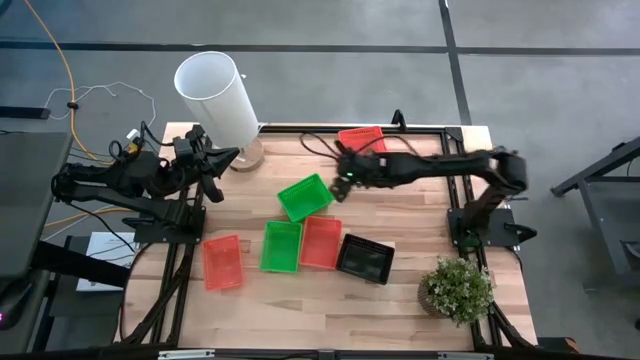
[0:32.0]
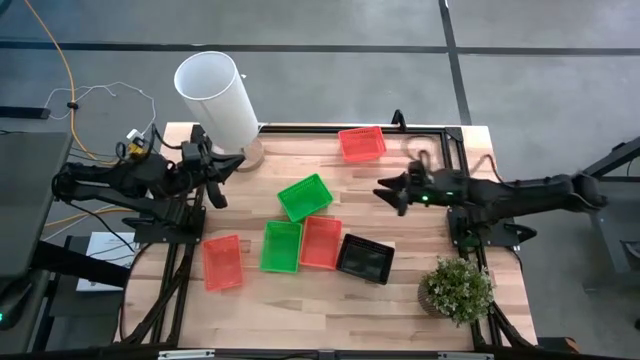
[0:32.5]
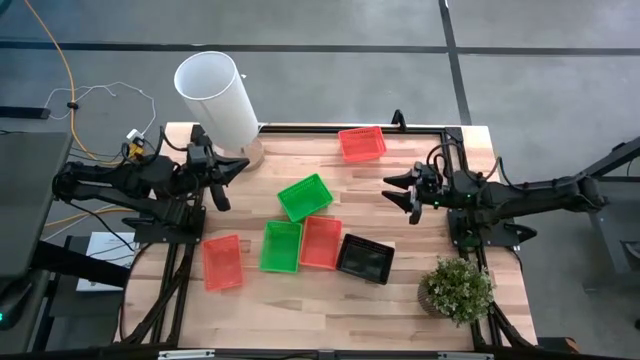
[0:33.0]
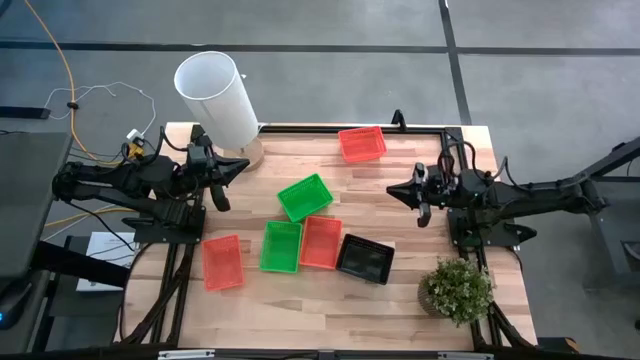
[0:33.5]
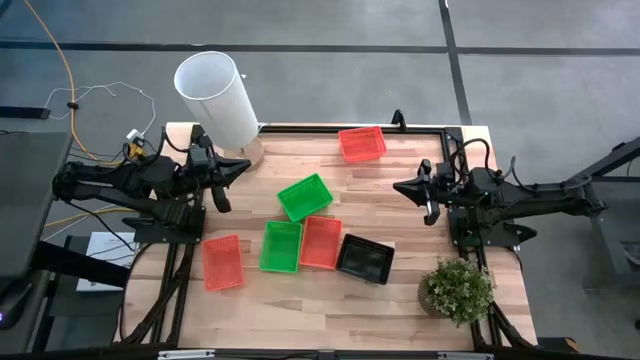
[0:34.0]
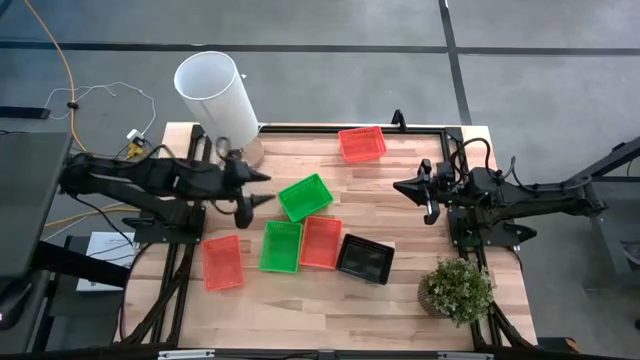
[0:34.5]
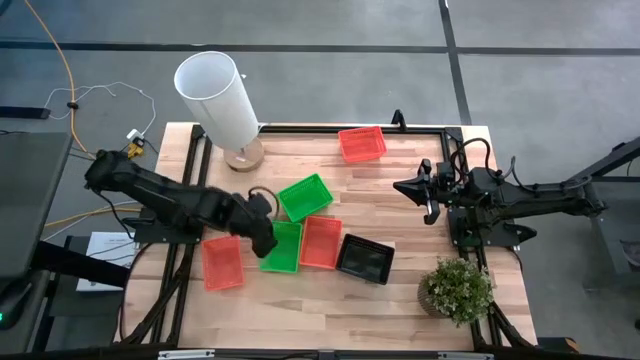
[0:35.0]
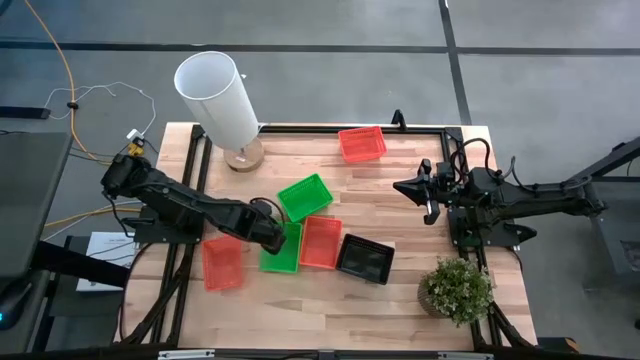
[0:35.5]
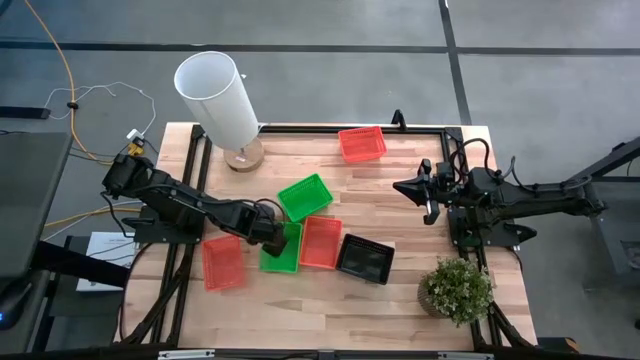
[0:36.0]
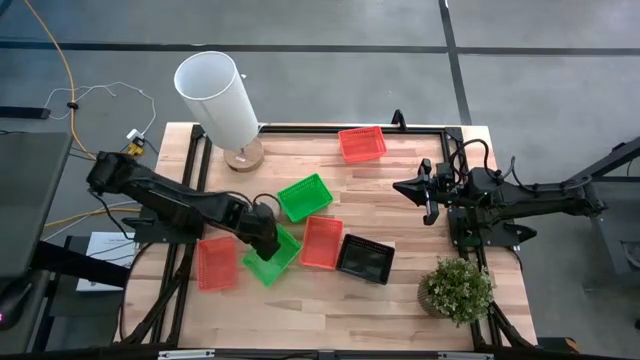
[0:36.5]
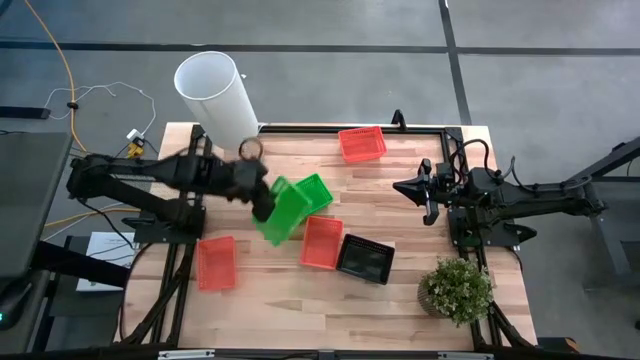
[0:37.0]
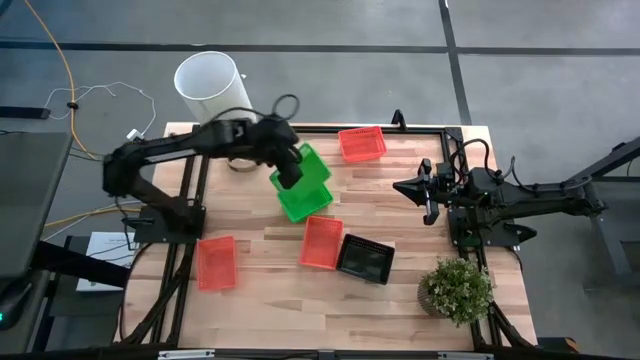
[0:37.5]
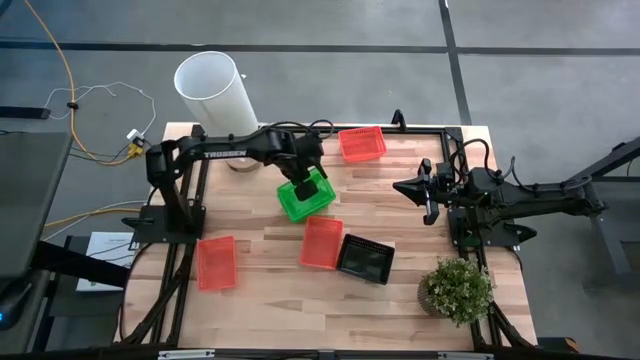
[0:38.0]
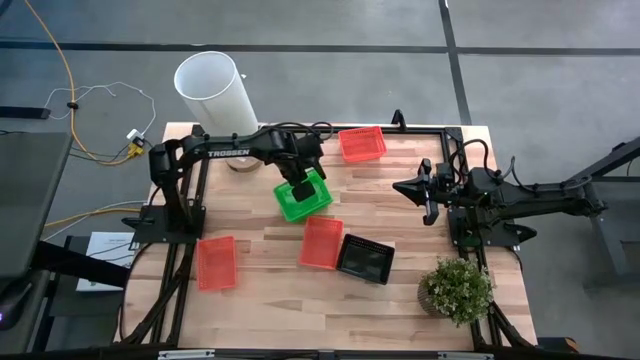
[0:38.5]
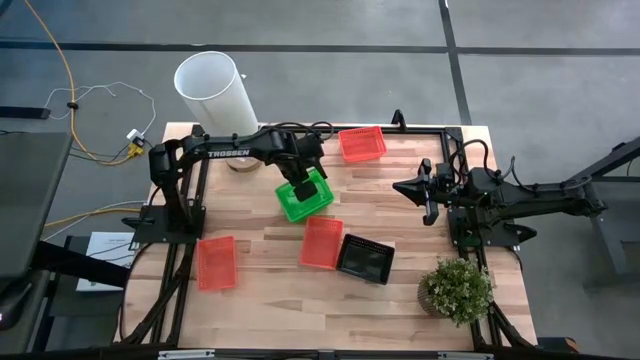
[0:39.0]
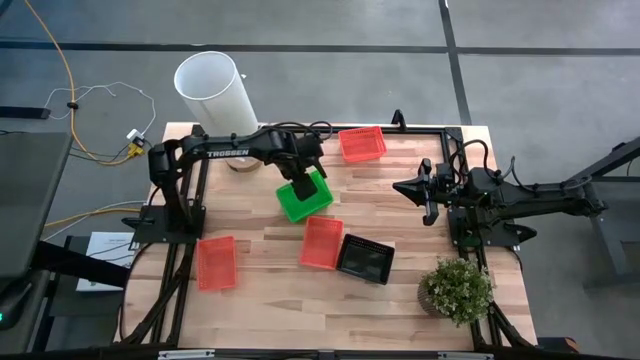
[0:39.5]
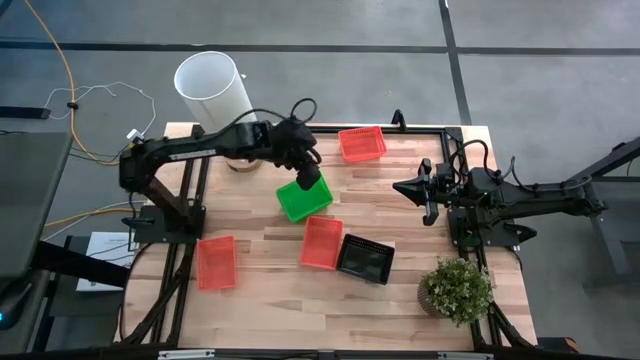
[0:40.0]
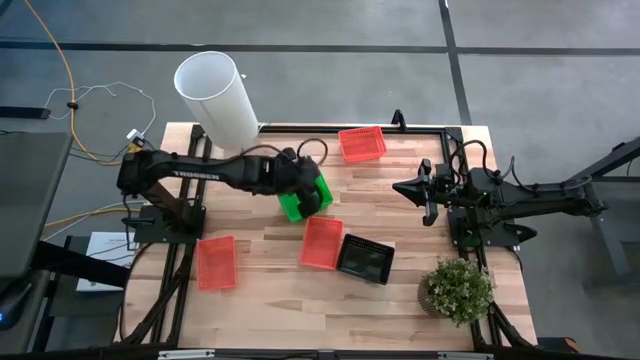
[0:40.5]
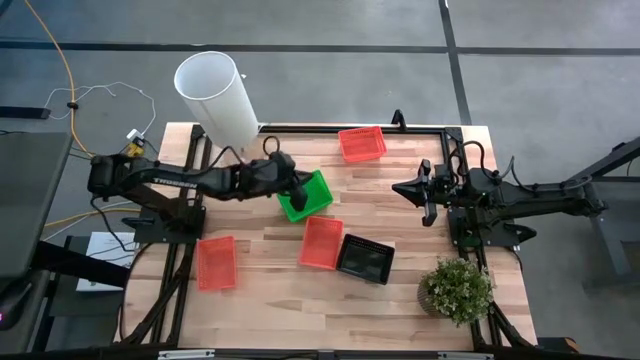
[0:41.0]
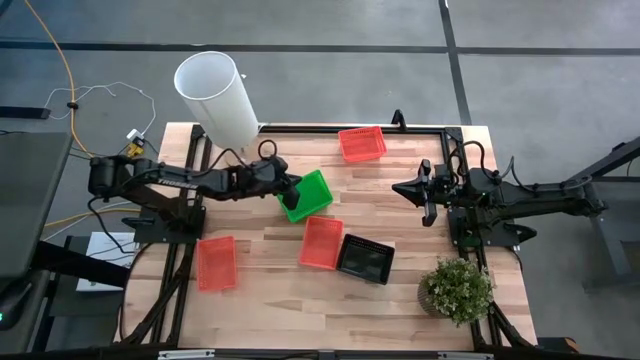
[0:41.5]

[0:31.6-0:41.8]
Stack the green bin on the green bin

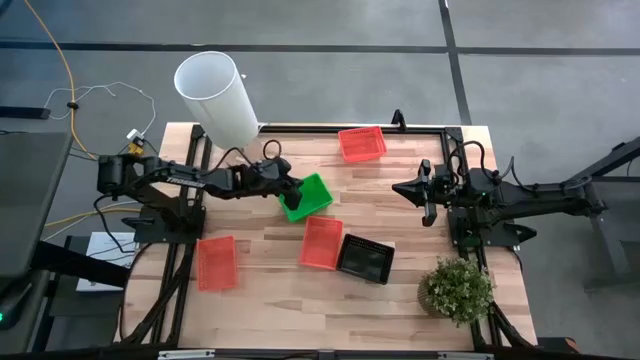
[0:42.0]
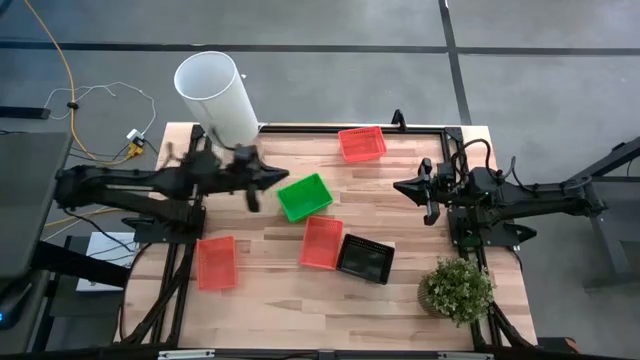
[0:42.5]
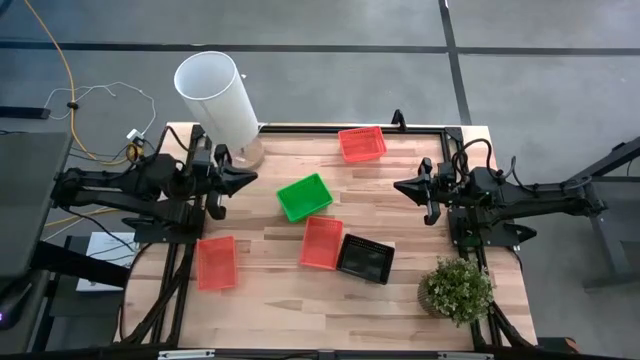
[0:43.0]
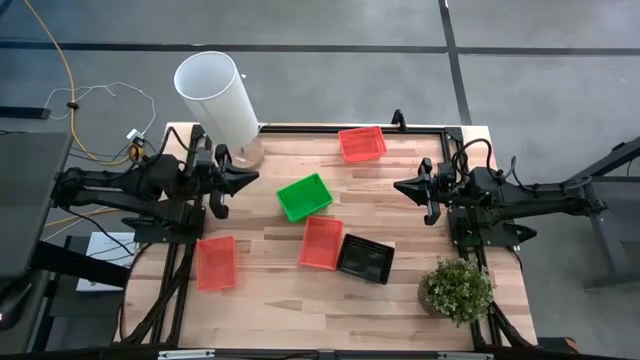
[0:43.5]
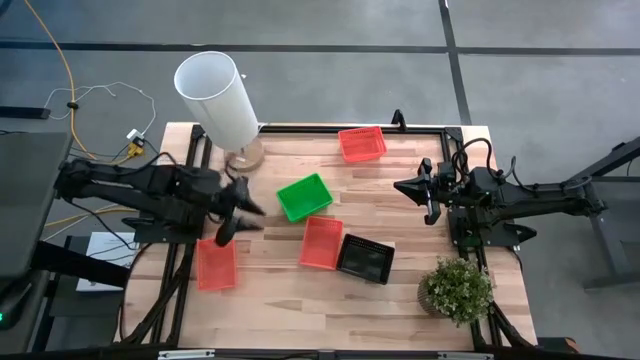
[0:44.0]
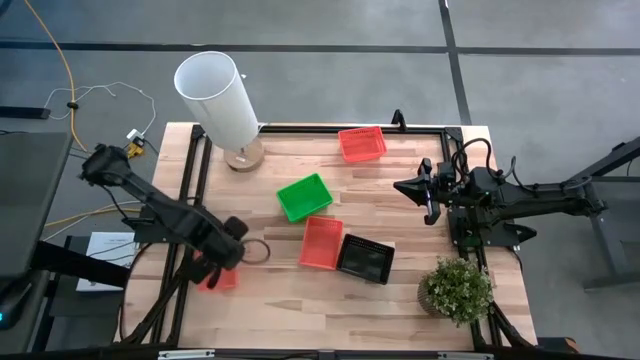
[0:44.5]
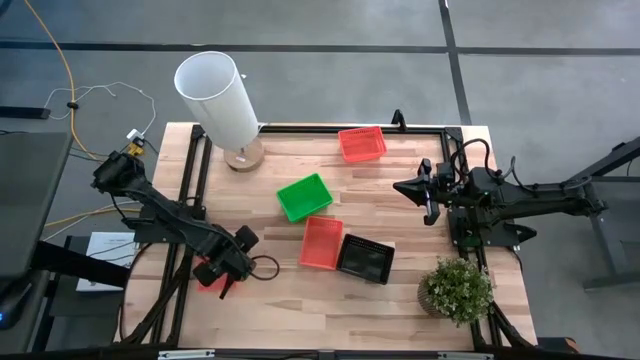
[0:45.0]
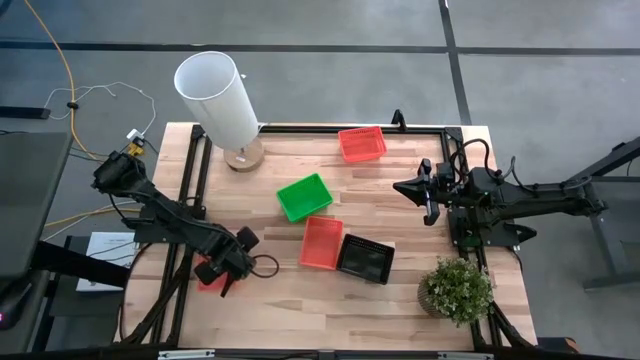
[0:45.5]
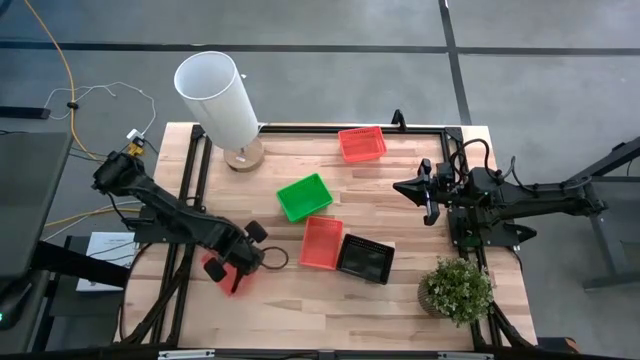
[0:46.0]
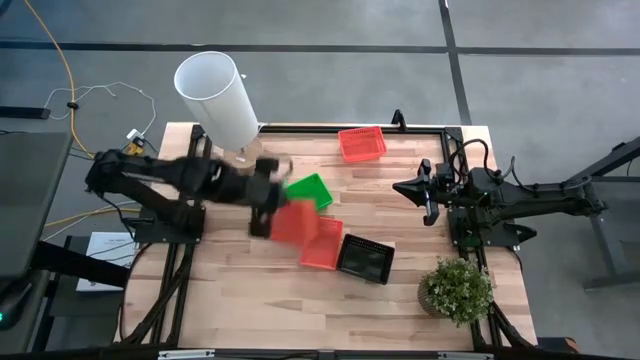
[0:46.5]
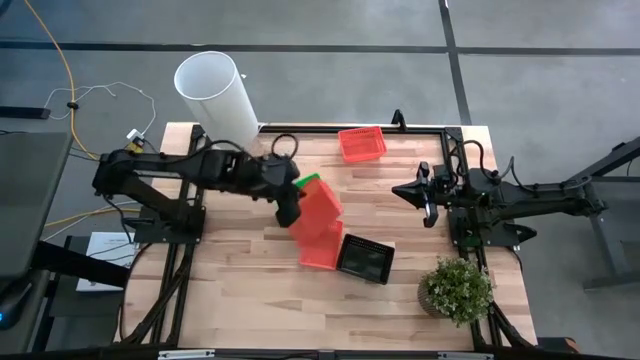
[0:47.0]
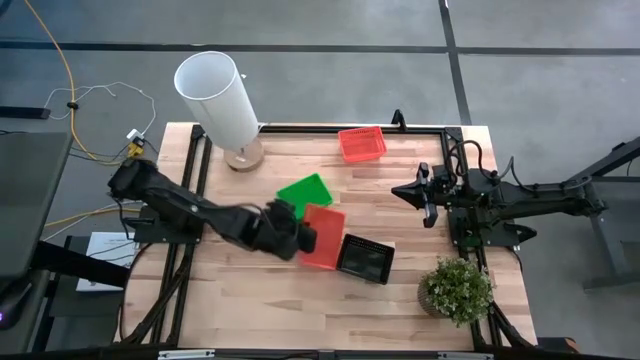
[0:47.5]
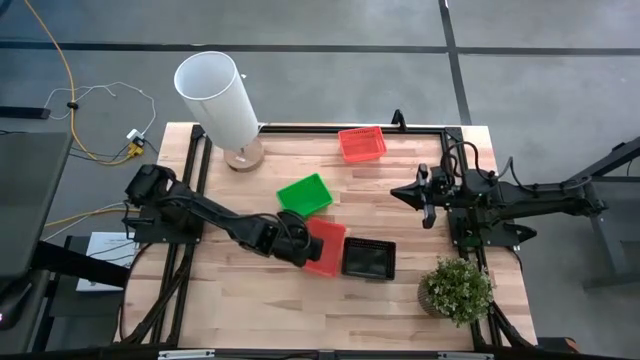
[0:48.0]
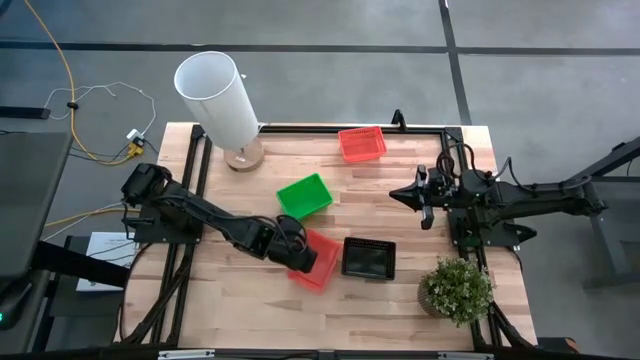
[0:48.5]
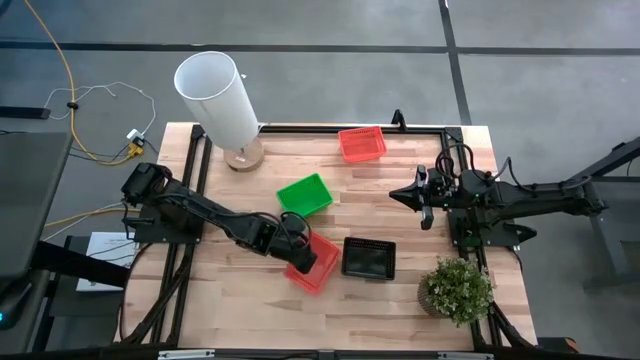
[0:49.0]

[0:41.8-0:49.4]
Stack the bottom left orange bin on the bottom right orange bin
